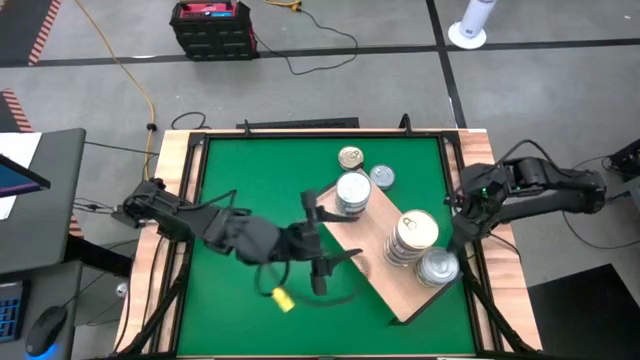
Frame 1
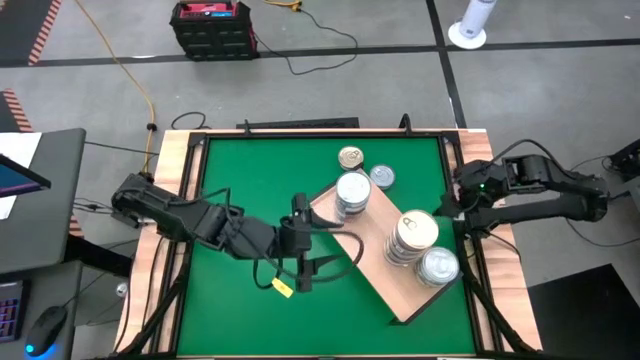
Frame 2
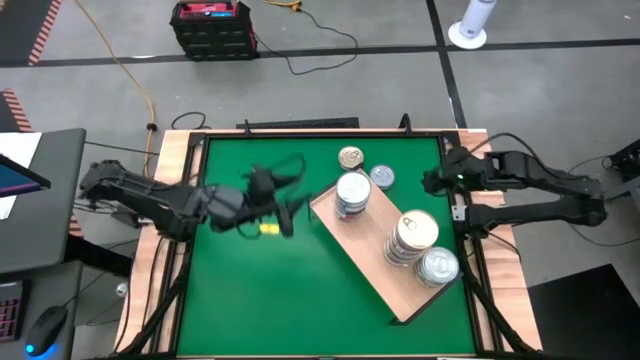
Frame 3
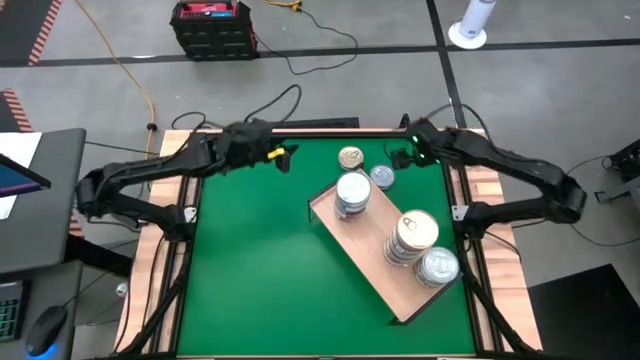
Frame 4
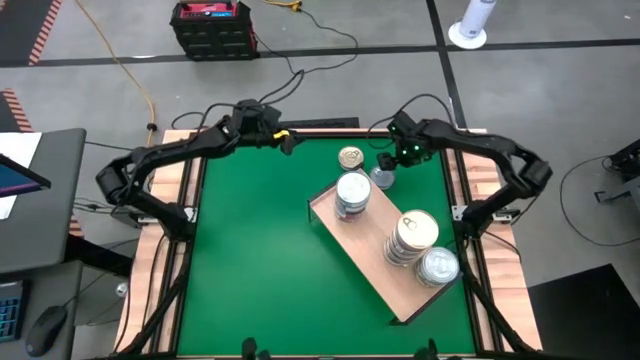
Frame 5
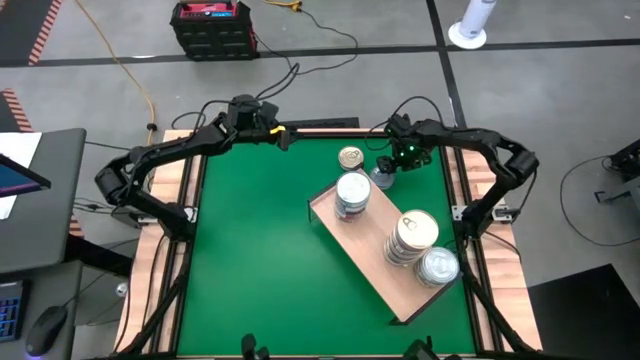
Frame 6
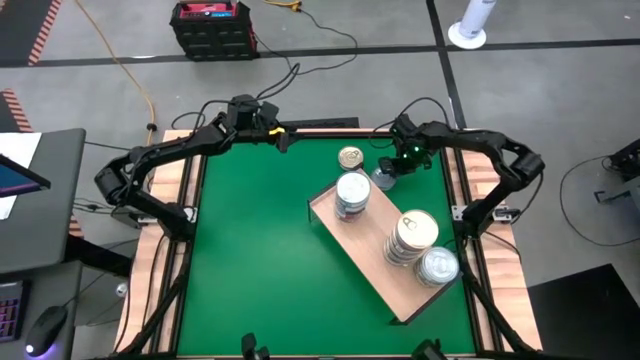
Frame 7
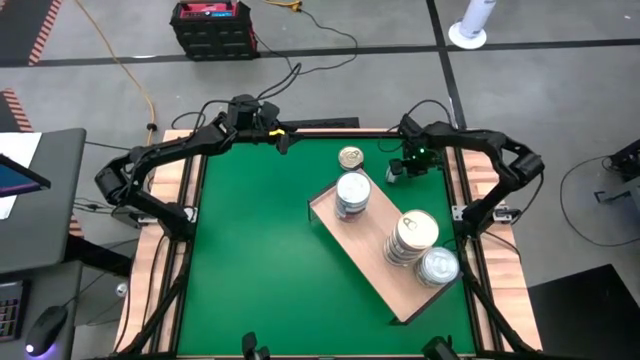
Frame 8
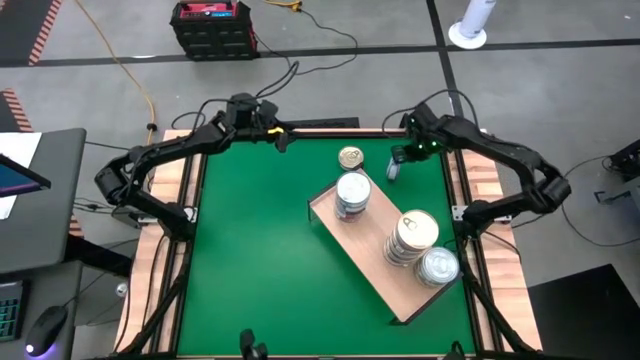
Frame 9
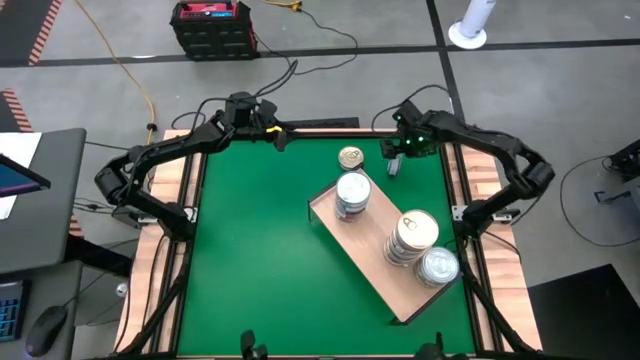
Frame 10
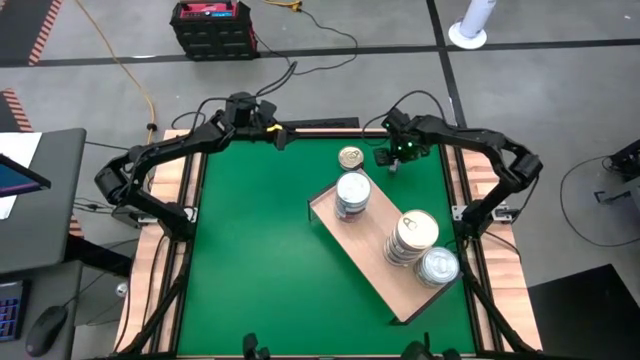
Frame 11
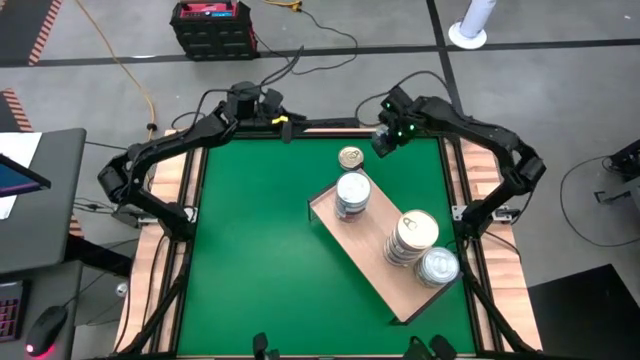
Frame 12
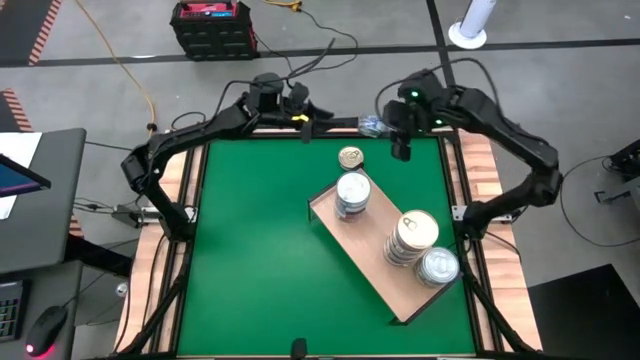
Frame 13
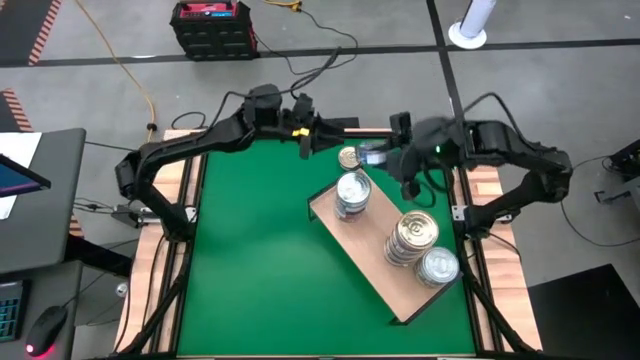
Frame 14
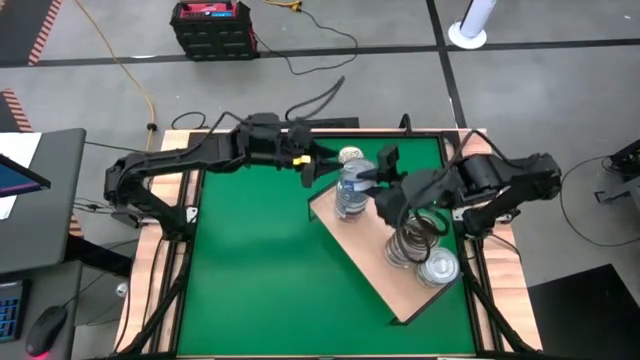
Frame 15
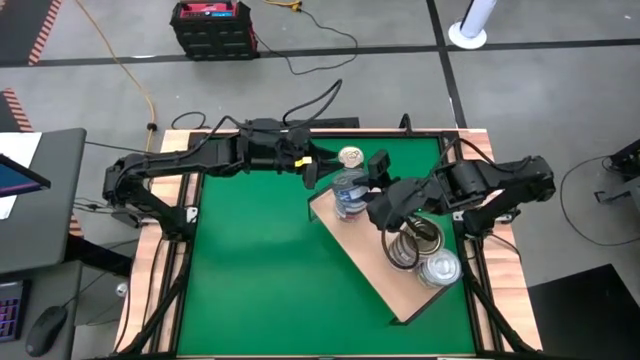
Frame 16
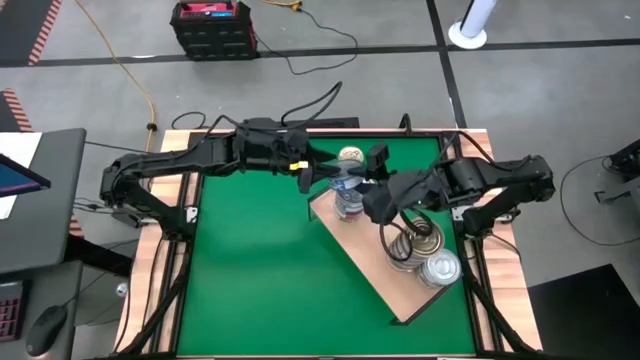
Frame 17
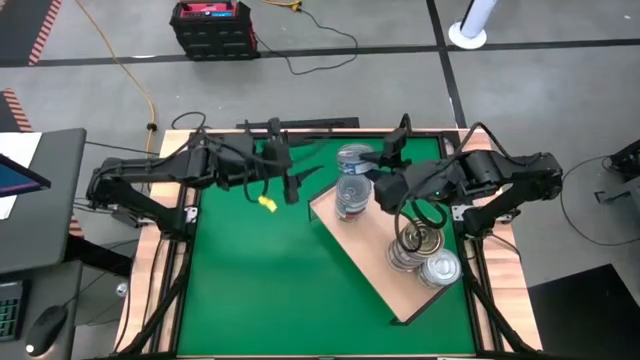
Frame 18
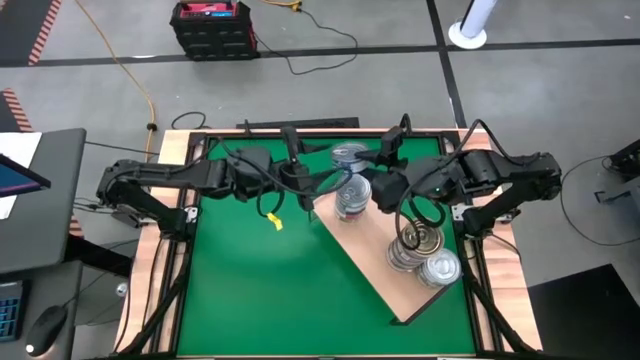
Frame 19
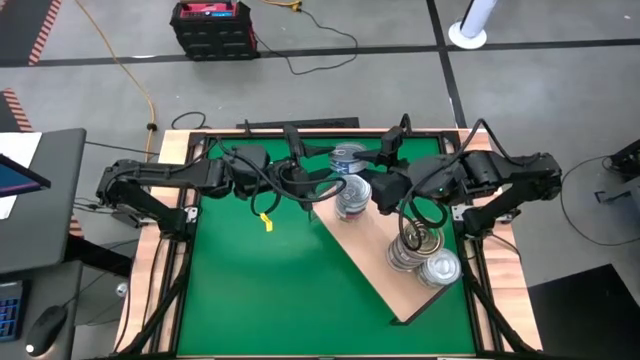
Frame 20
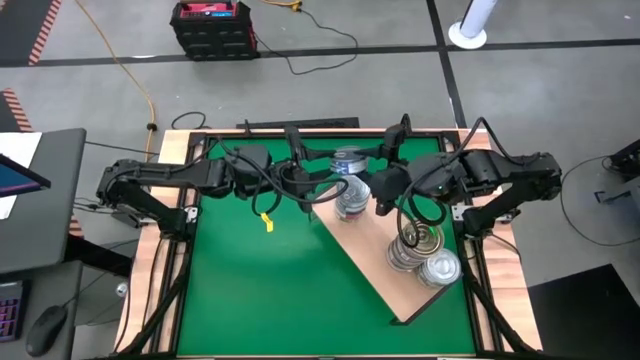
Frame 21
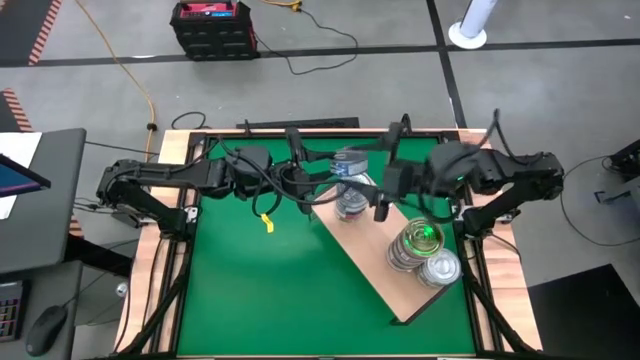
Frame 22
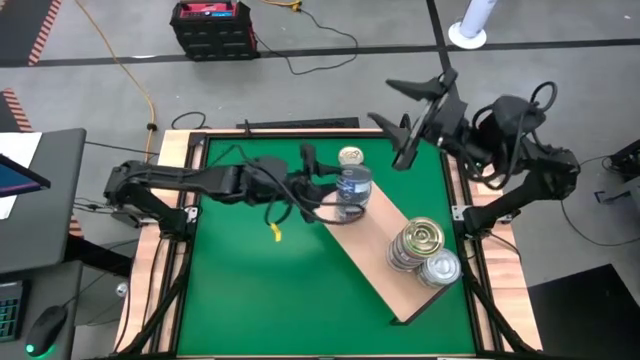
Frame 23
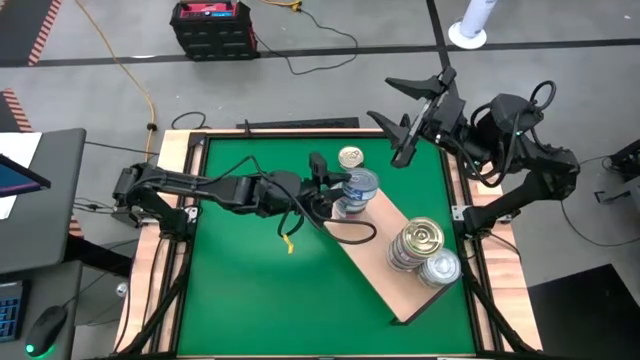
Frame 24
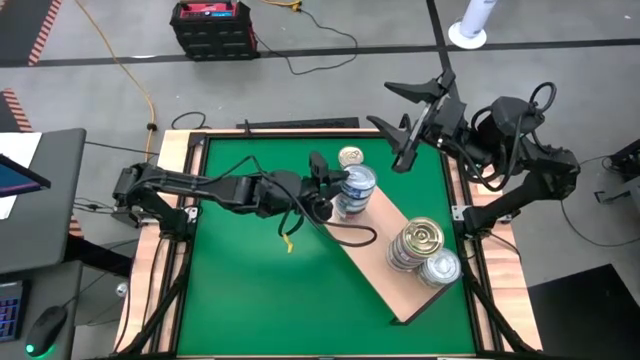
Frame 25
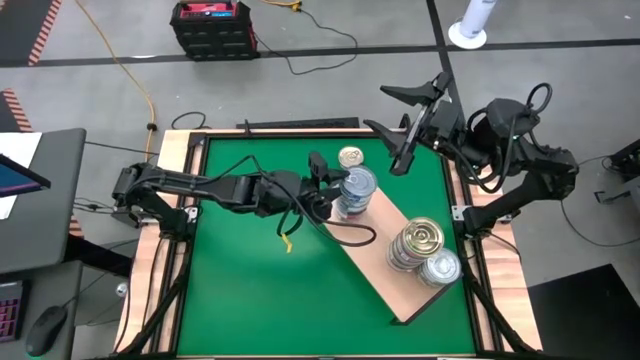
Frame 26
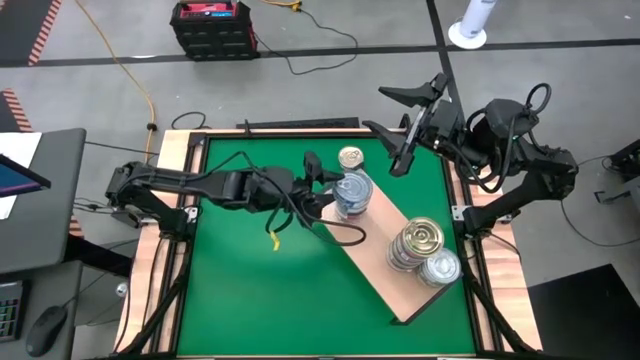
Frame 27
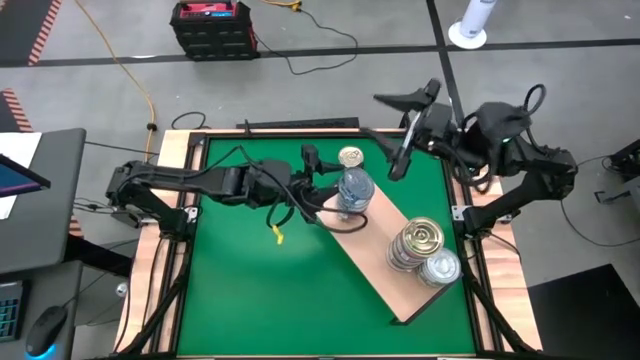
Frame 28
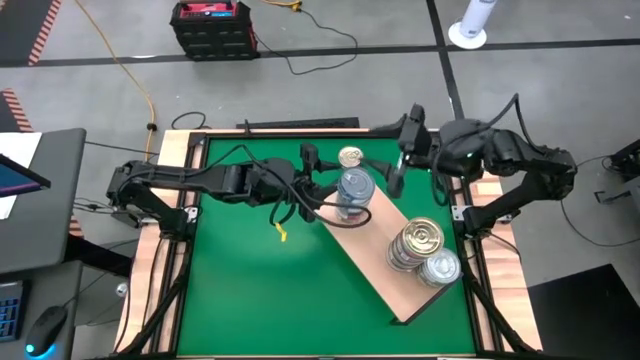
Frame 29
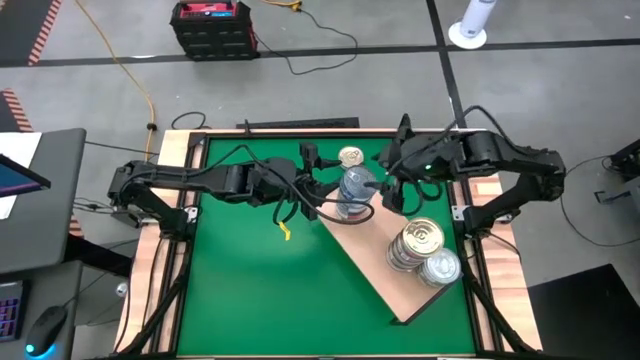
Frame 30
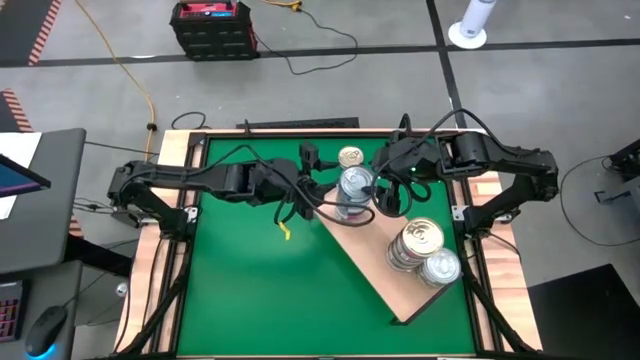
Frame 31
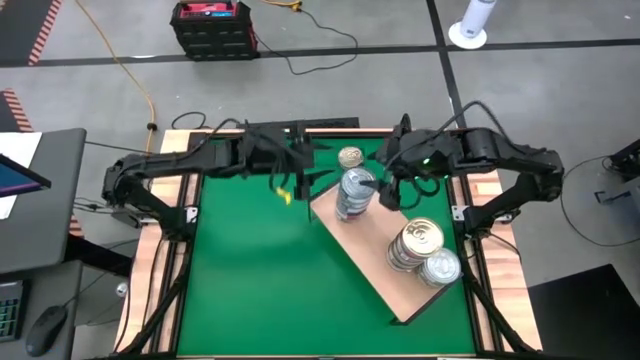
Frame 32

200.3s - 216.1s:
Task: Stack canned seafood by type on shelf
Stack the blue tuna can on top of the other blue tuna cans on the shelf

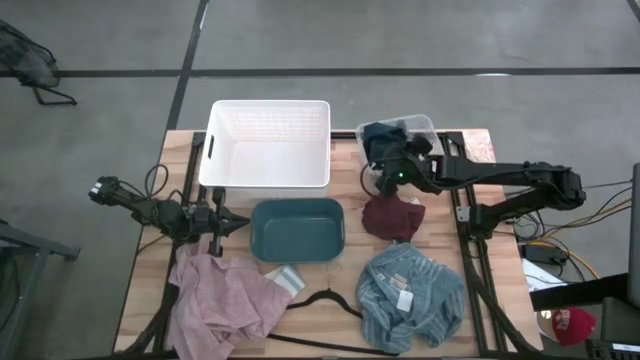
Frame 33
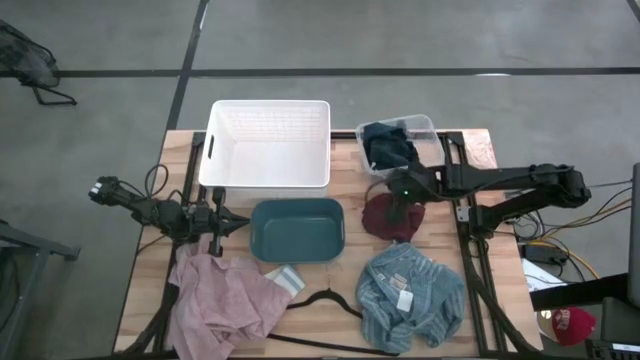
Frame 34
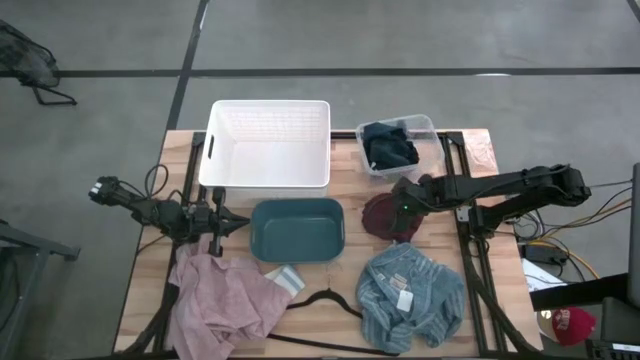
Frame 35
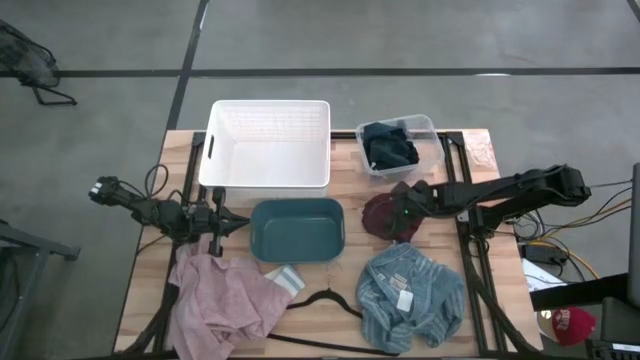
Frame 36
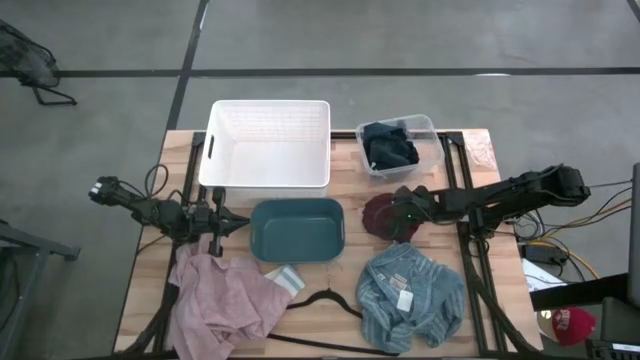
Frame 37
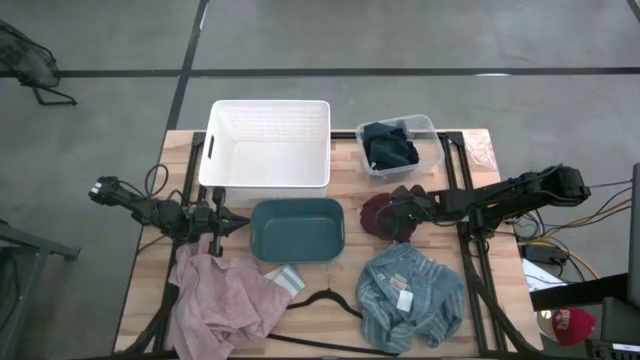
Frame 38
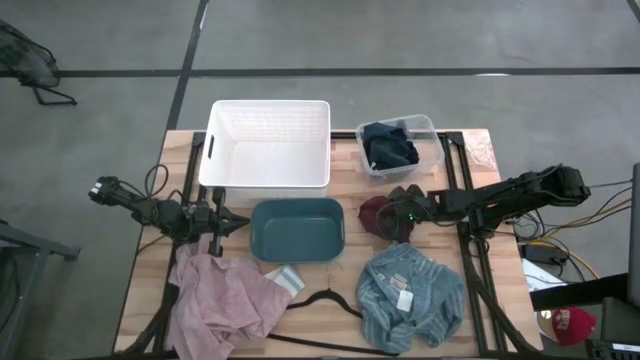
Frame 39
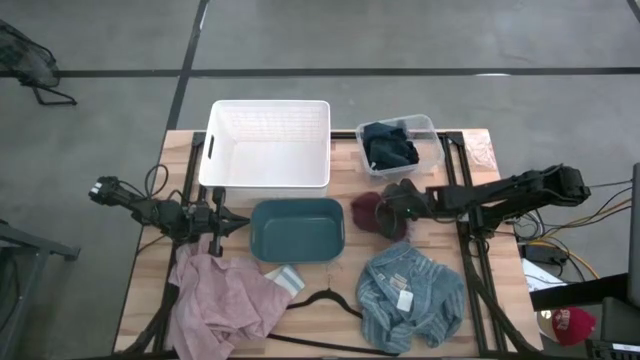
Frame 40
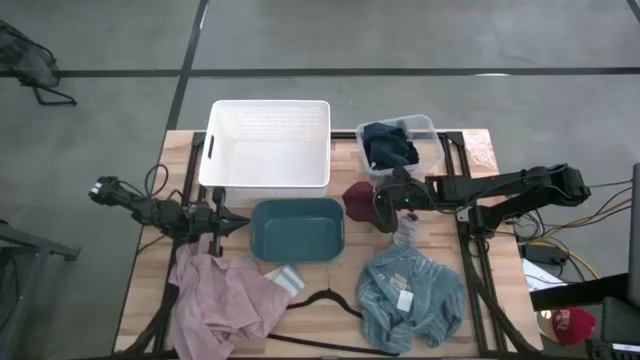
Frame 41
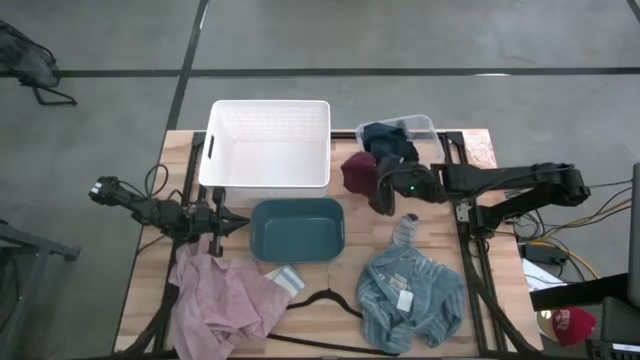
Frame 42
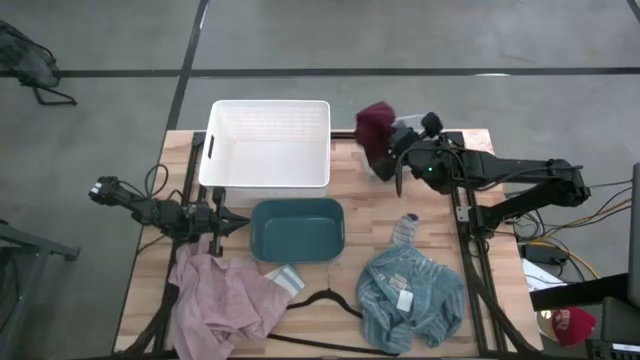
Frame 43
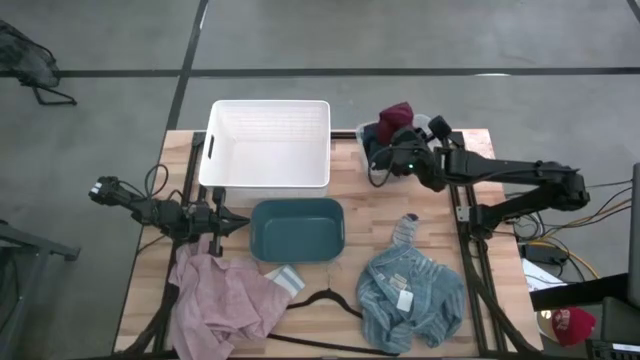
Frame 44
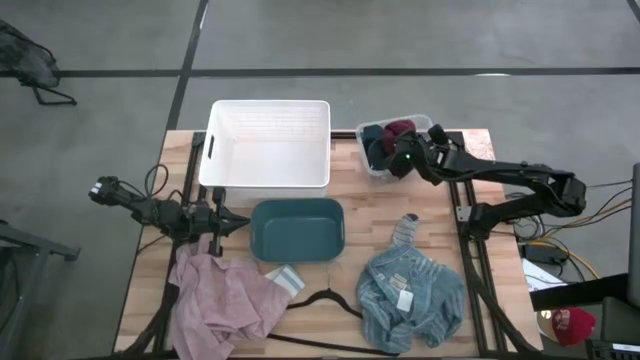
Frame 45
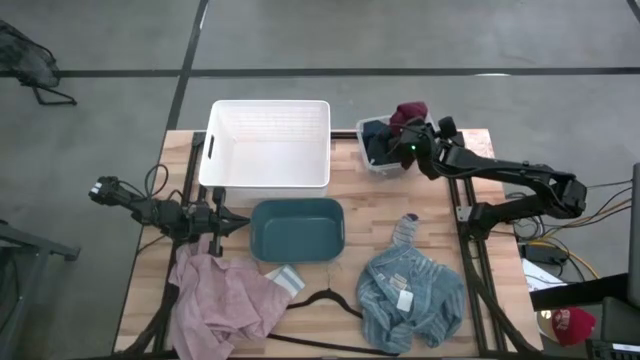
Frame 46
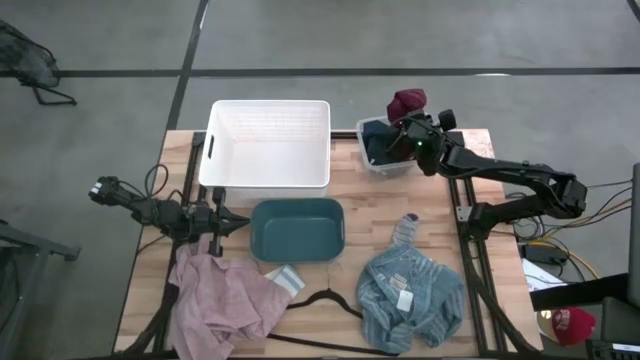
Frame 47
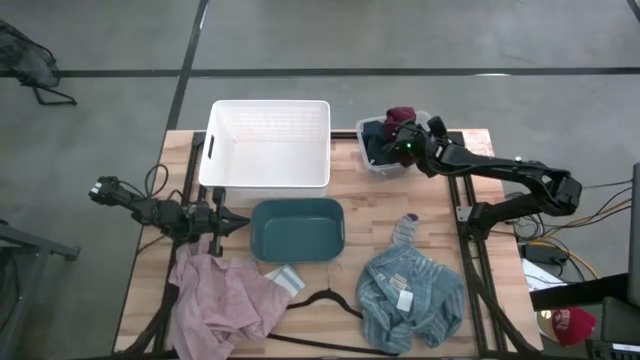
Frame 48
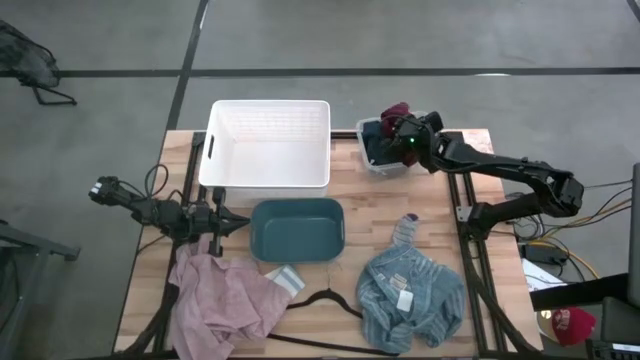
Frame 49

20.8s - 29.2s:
Task: Pick & Place Cloths
Put the red shorts into the transparent bin
